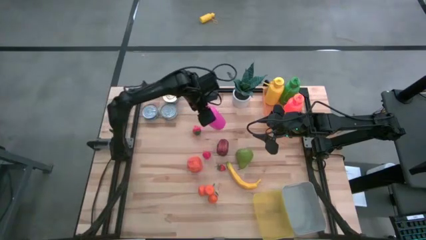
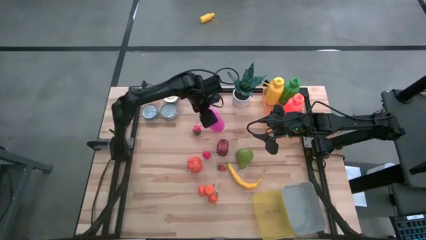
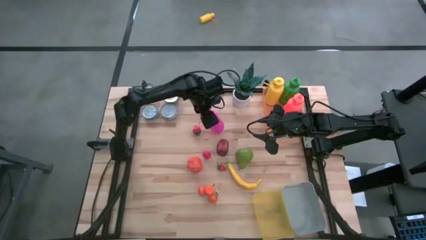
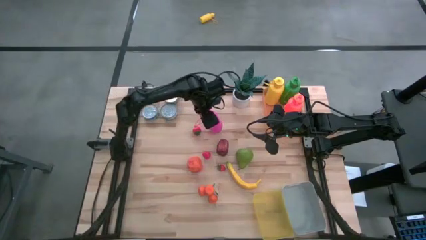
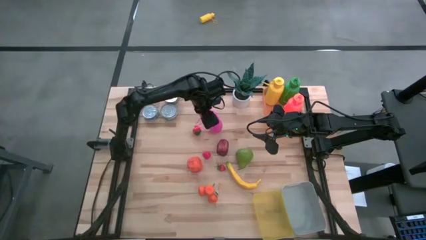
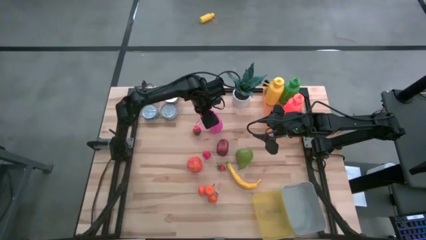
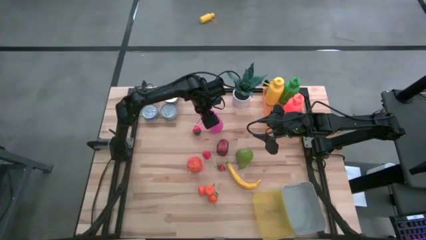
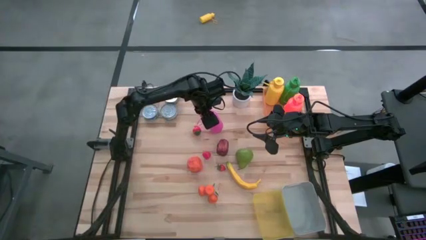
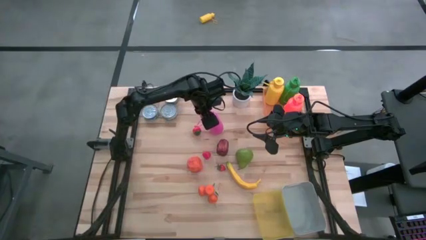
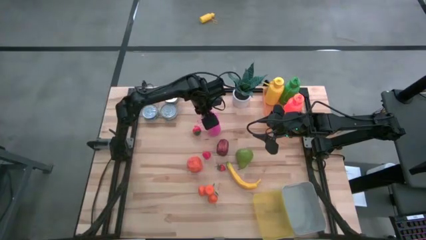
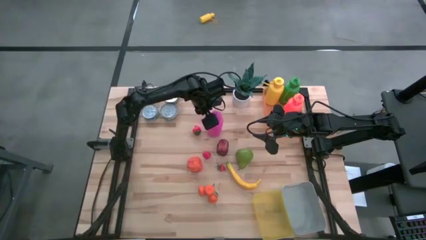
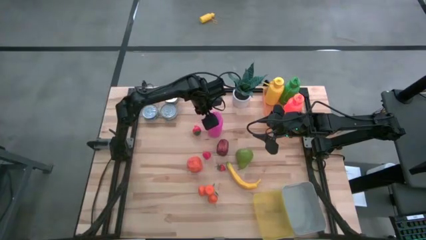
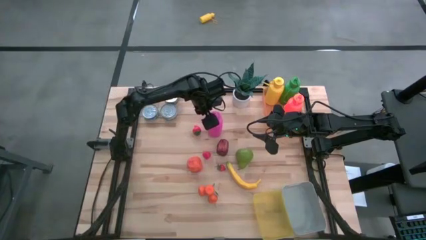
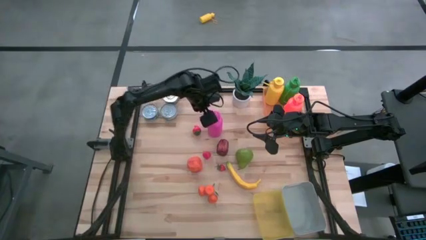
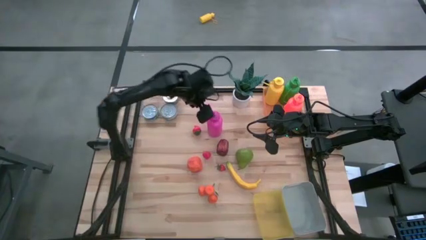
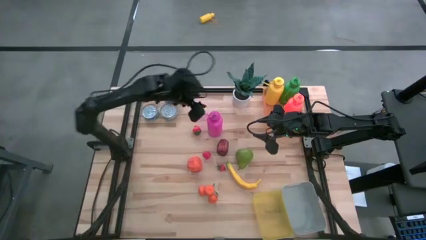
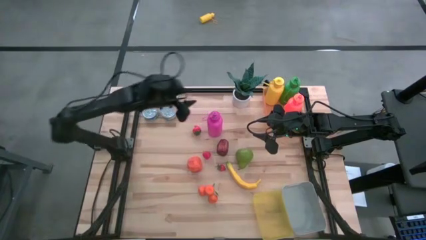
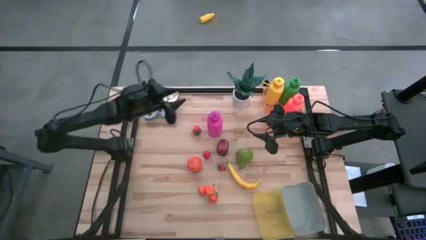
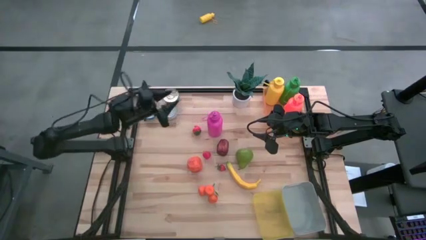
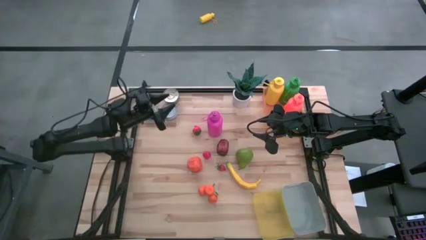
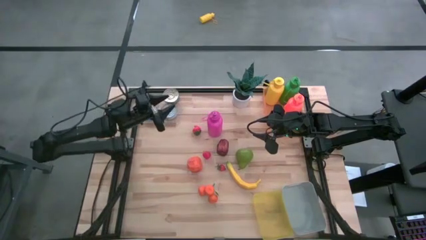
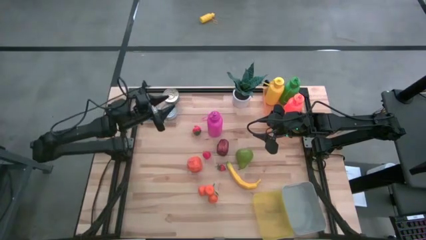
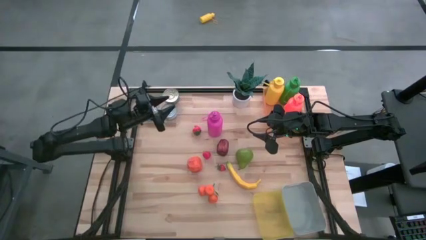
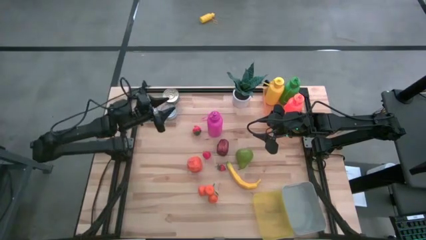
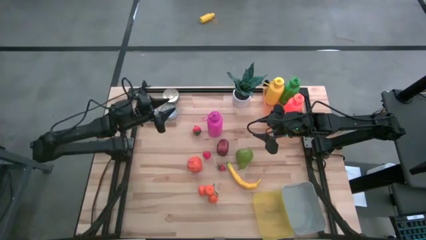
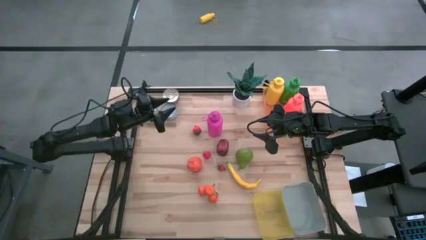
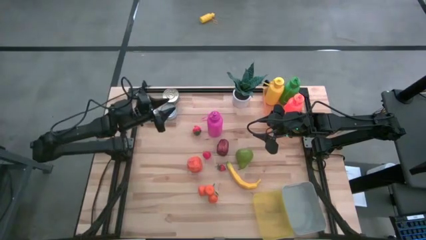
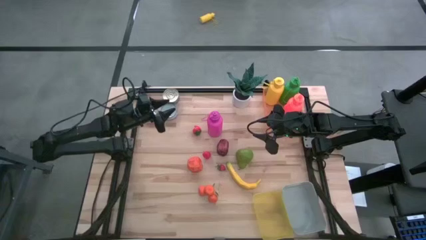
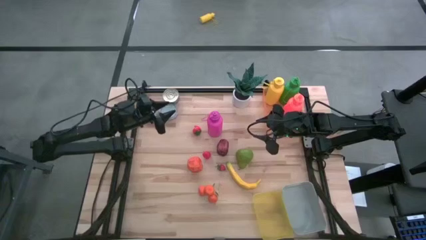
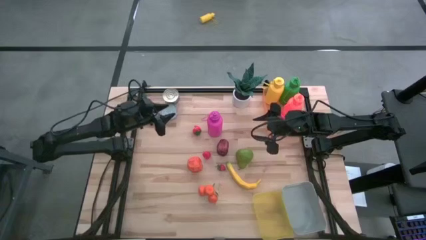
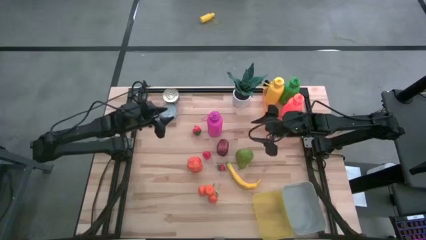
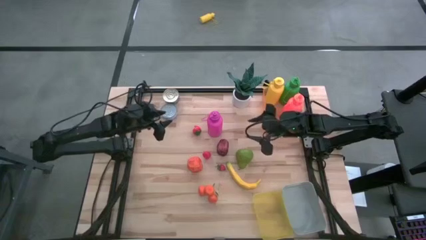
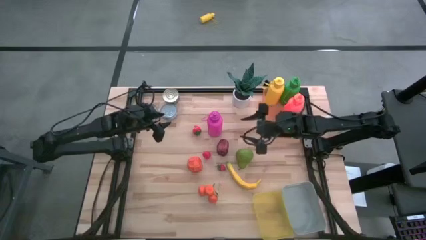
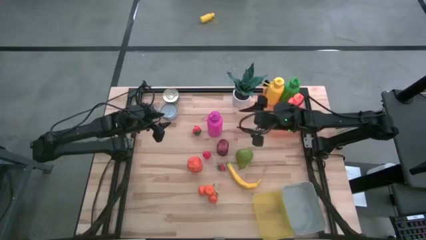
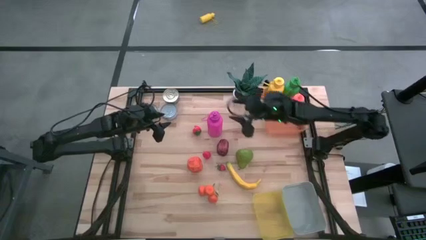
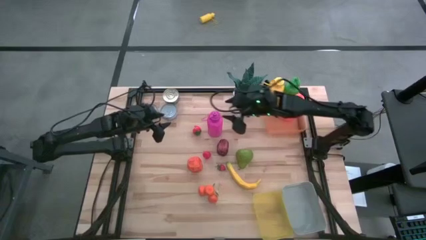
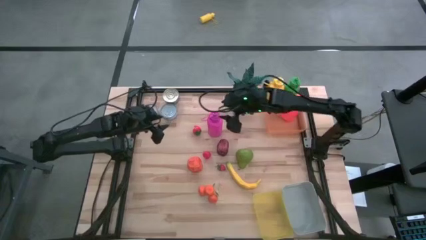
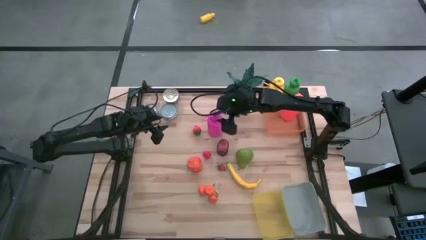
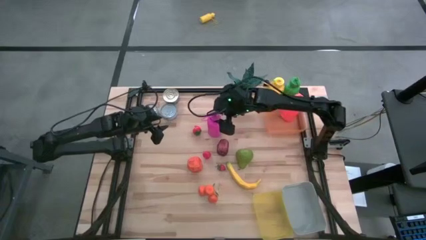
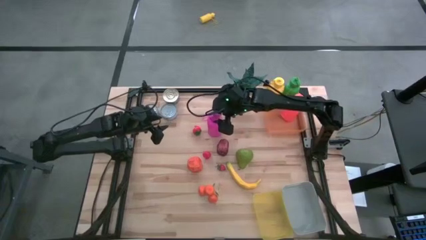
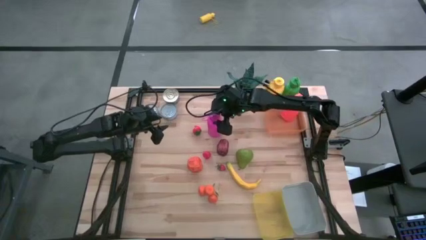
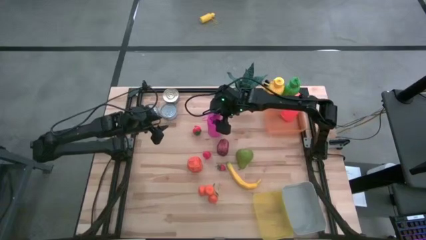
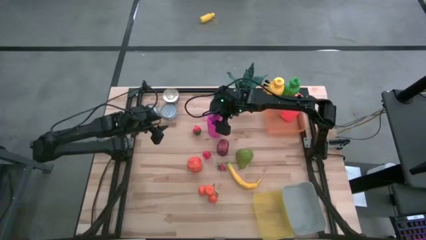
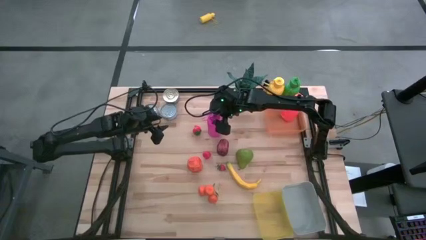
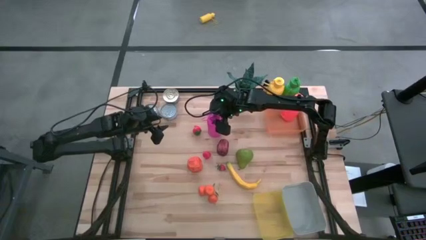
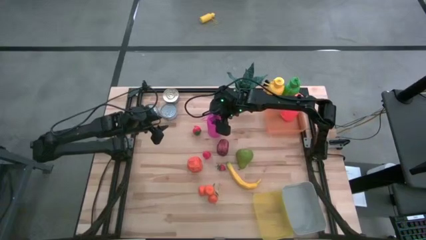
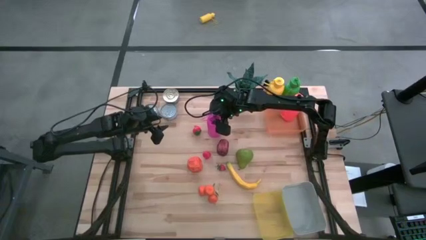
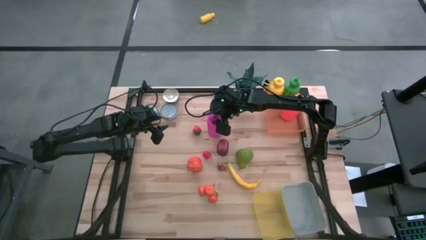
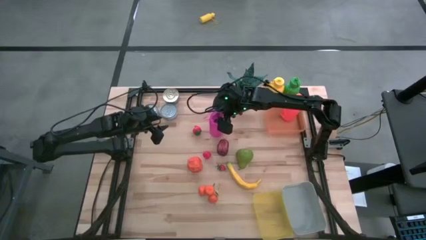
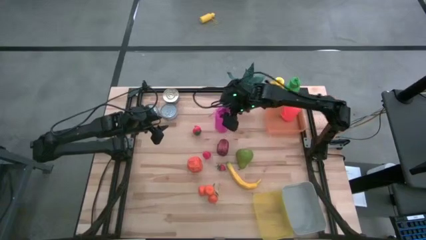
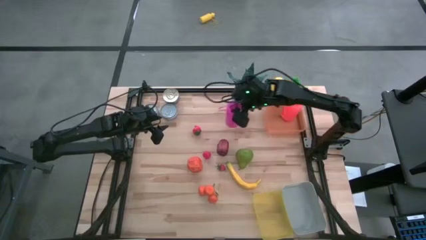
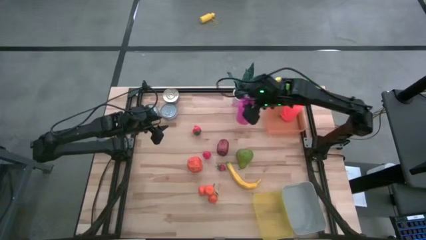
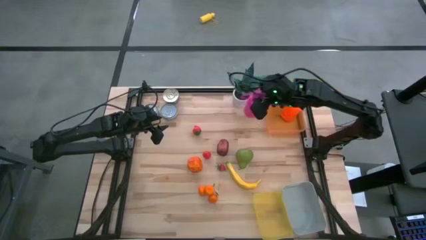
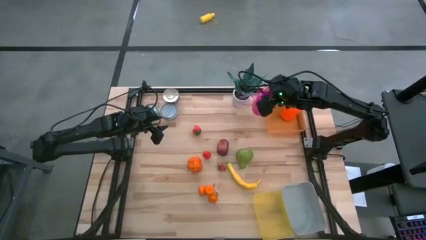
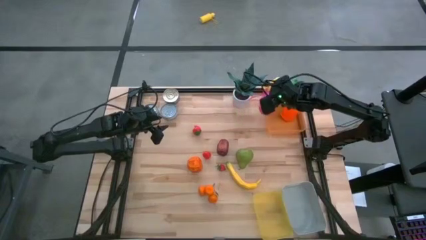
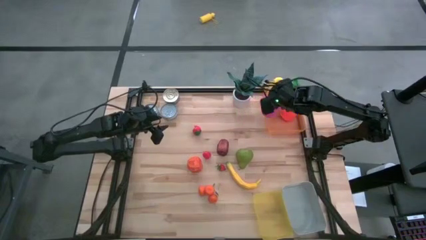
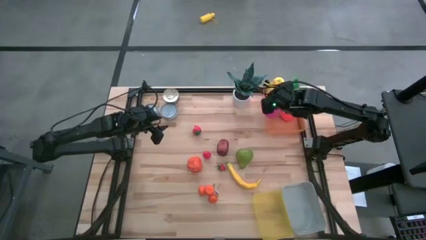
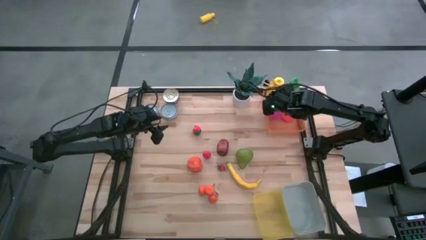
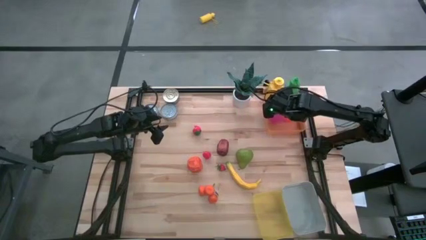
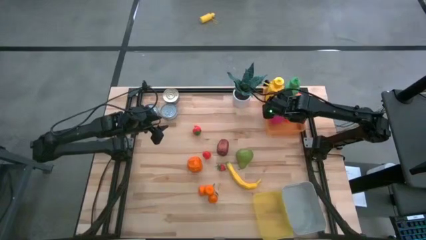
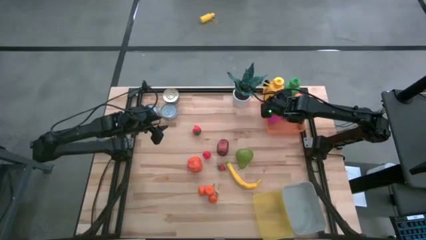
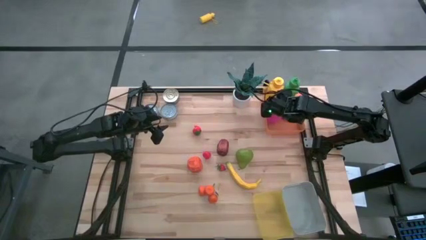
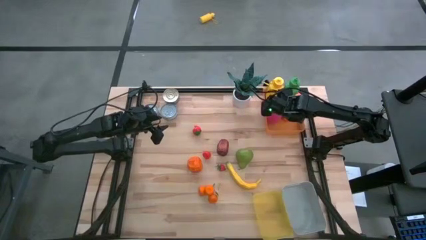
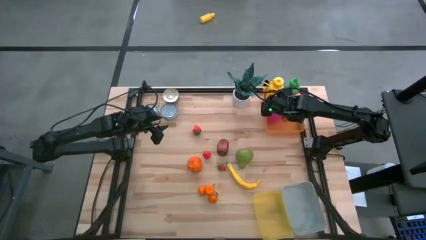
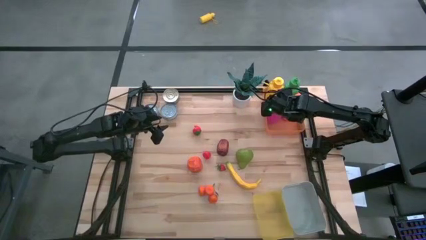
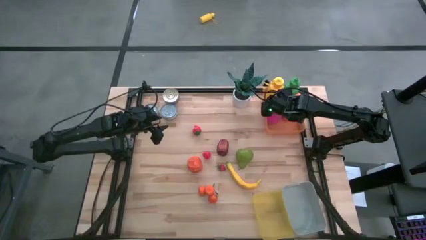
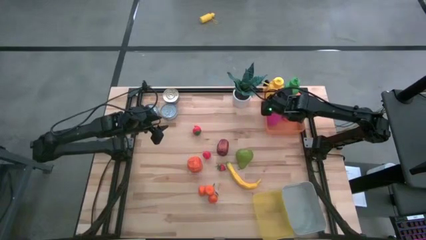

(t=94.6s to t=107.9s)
Task: Pick & Place Food Item
Put the violet water bottle into the orange bin
